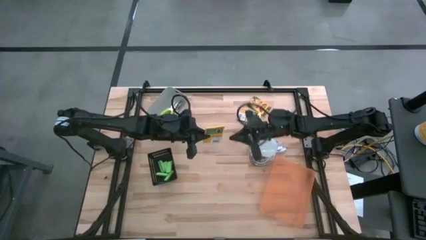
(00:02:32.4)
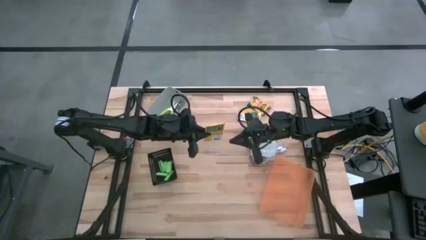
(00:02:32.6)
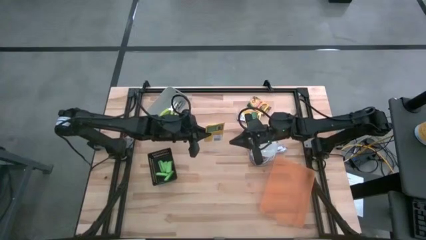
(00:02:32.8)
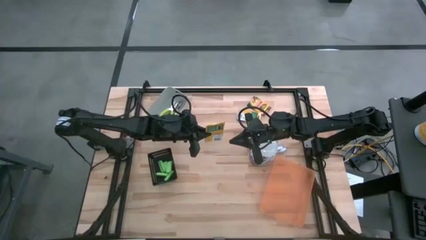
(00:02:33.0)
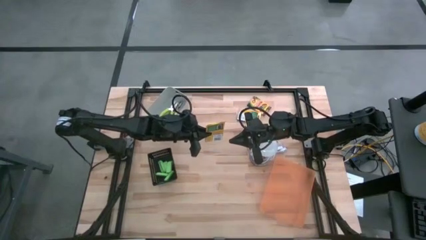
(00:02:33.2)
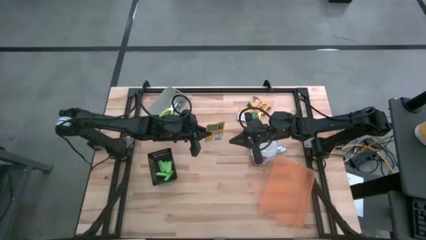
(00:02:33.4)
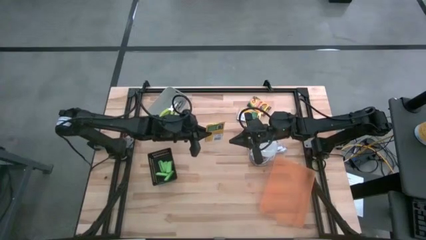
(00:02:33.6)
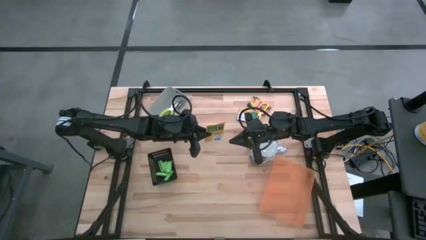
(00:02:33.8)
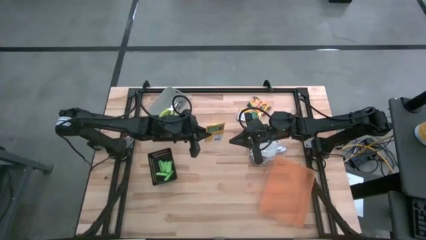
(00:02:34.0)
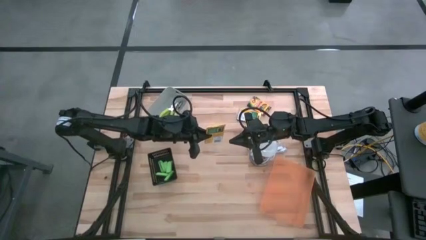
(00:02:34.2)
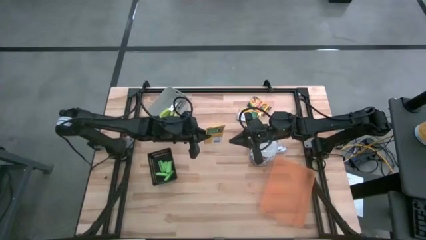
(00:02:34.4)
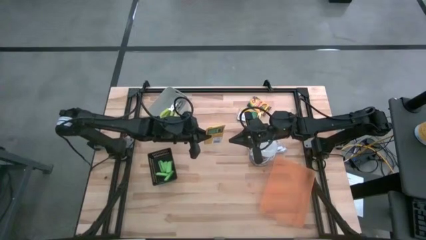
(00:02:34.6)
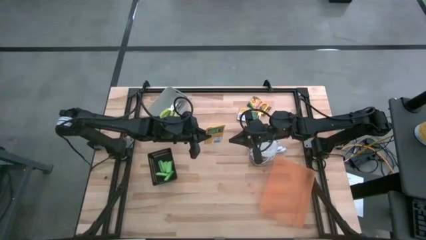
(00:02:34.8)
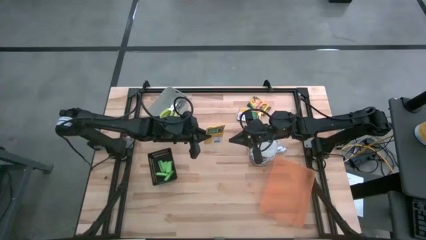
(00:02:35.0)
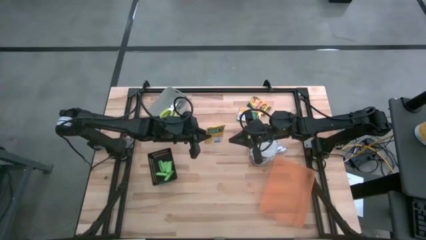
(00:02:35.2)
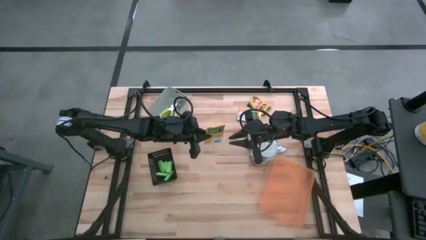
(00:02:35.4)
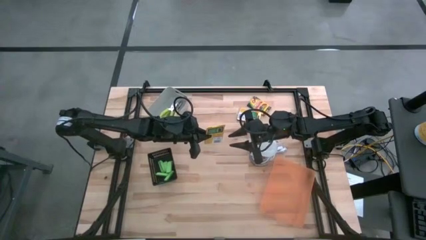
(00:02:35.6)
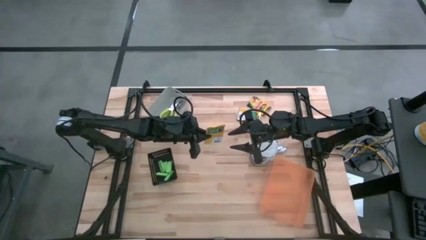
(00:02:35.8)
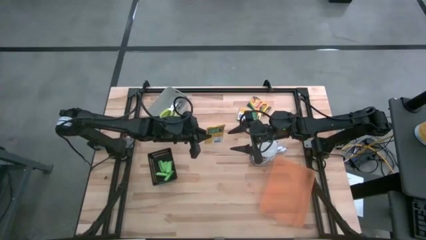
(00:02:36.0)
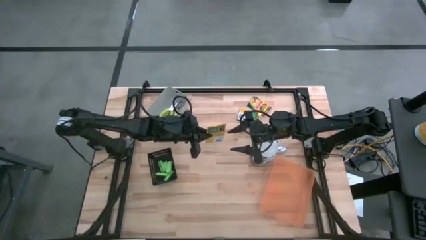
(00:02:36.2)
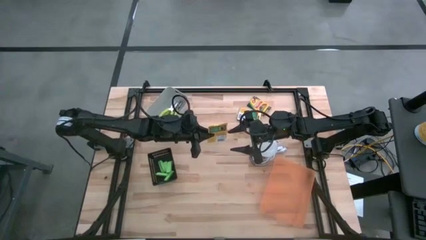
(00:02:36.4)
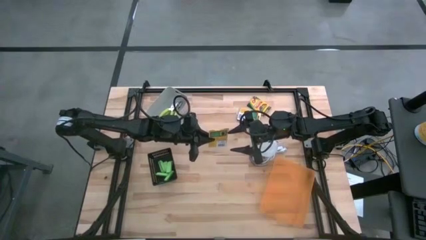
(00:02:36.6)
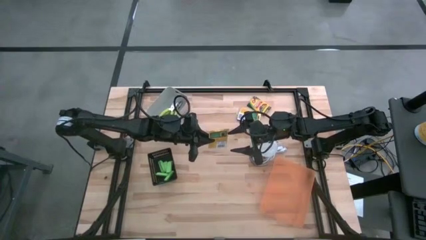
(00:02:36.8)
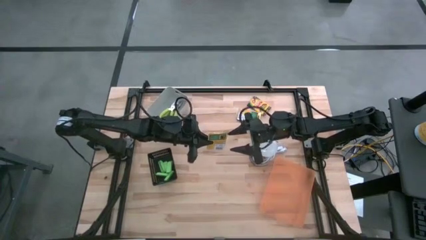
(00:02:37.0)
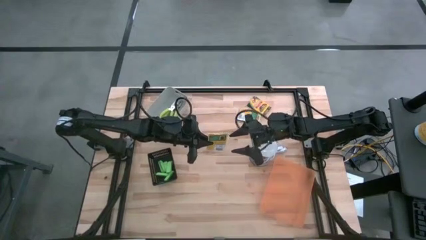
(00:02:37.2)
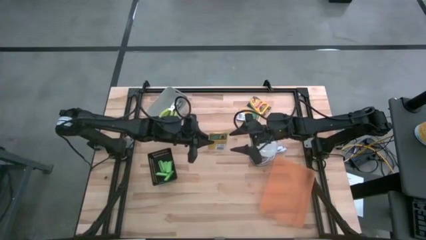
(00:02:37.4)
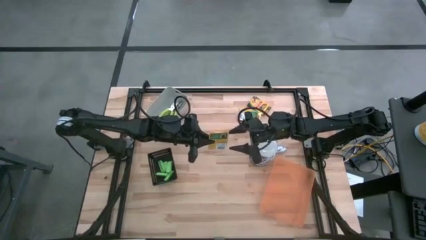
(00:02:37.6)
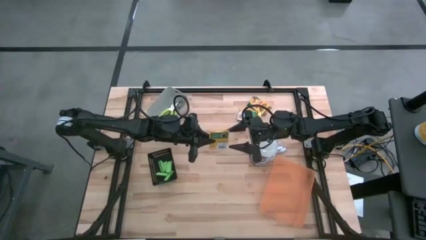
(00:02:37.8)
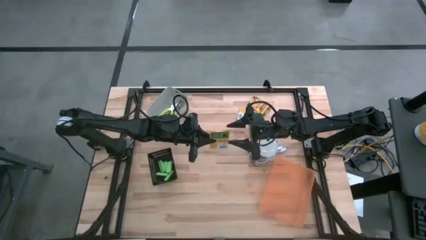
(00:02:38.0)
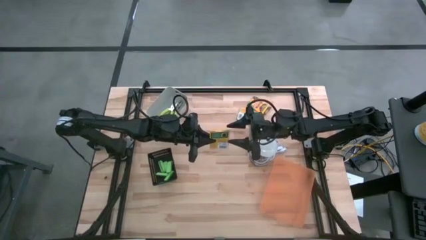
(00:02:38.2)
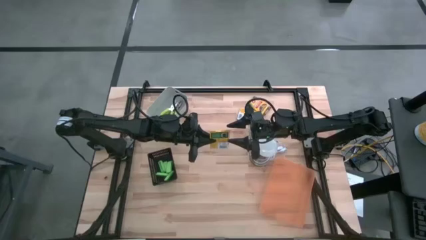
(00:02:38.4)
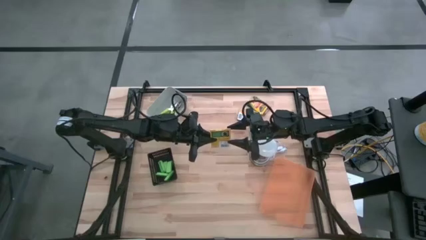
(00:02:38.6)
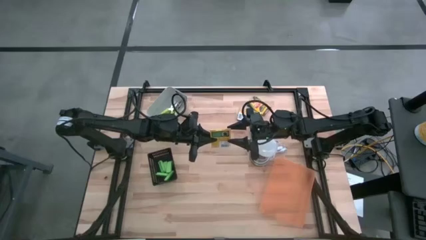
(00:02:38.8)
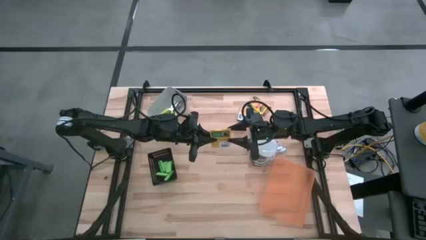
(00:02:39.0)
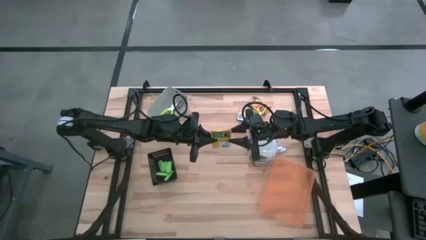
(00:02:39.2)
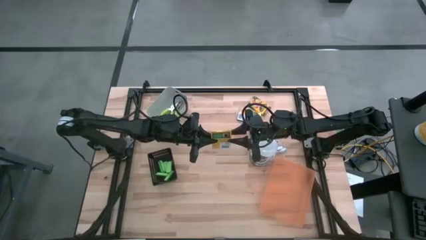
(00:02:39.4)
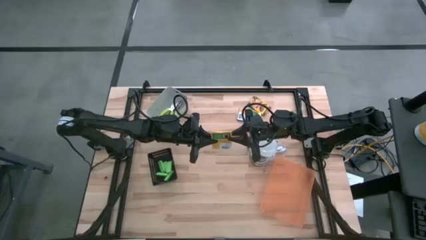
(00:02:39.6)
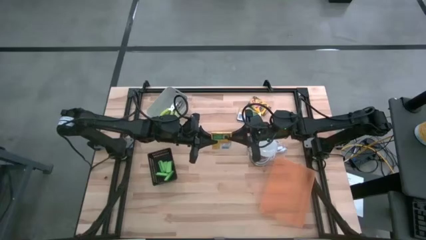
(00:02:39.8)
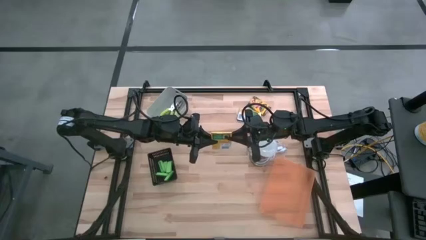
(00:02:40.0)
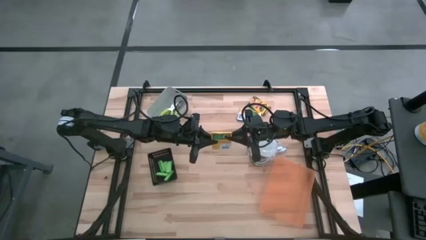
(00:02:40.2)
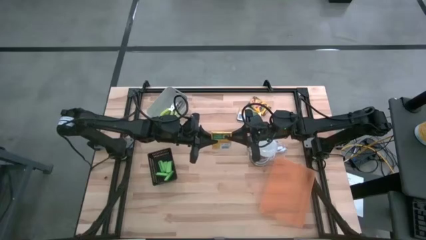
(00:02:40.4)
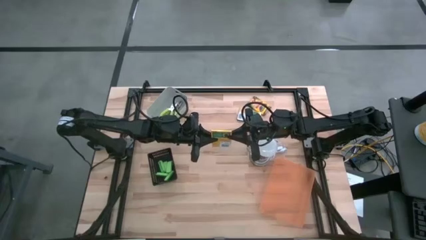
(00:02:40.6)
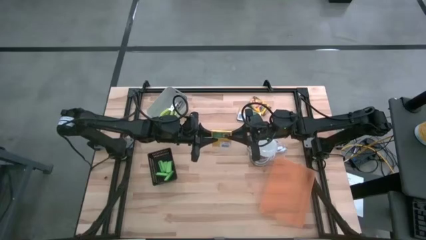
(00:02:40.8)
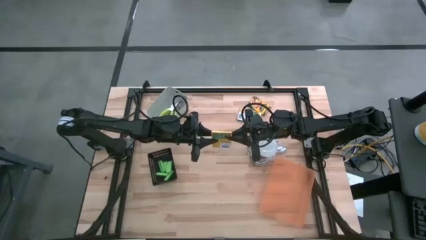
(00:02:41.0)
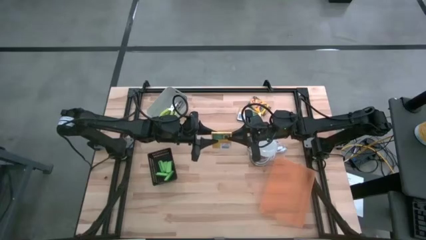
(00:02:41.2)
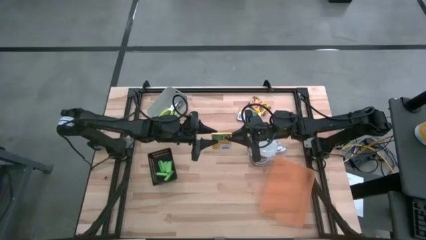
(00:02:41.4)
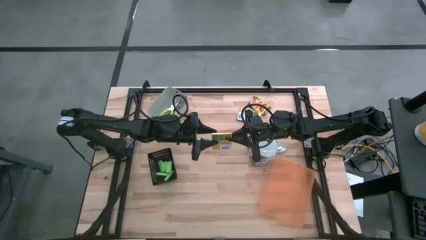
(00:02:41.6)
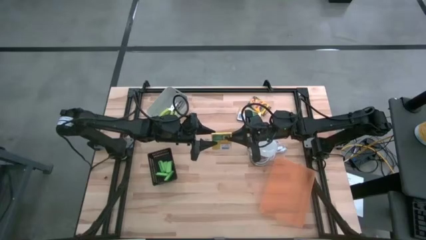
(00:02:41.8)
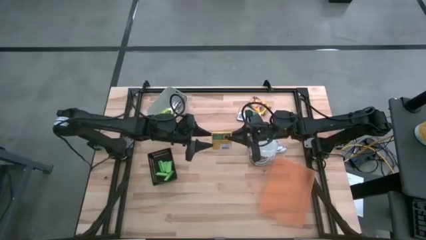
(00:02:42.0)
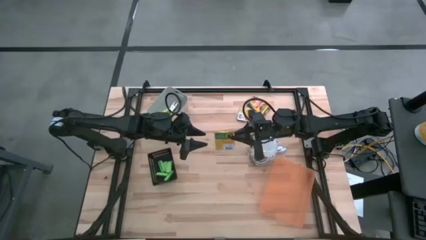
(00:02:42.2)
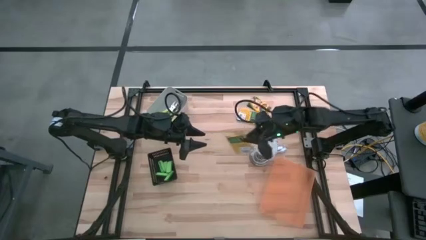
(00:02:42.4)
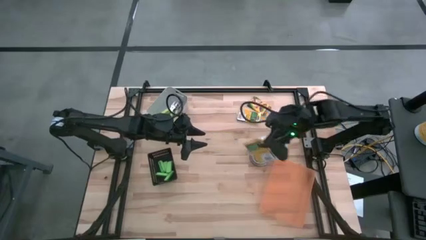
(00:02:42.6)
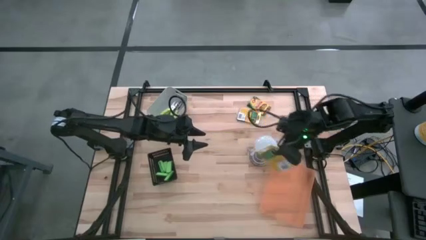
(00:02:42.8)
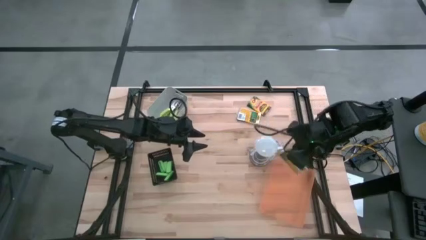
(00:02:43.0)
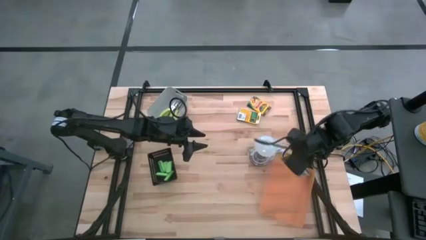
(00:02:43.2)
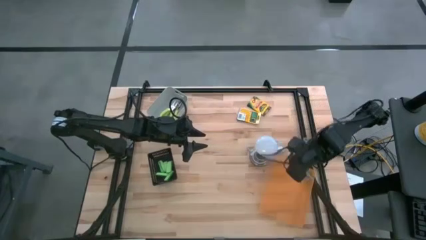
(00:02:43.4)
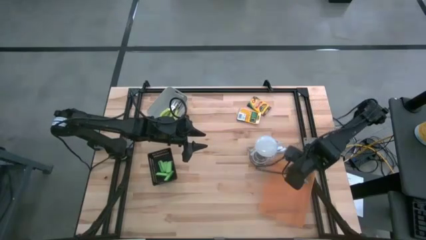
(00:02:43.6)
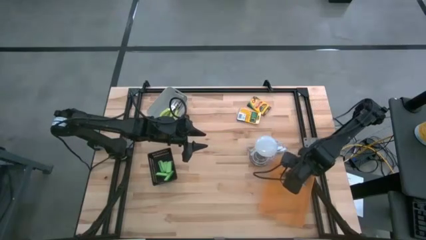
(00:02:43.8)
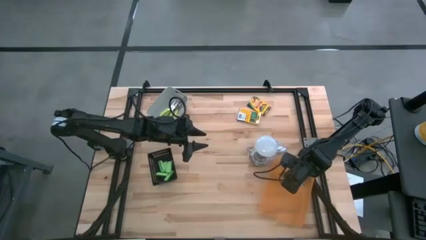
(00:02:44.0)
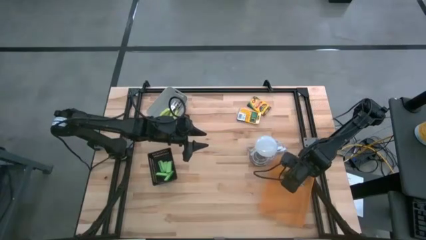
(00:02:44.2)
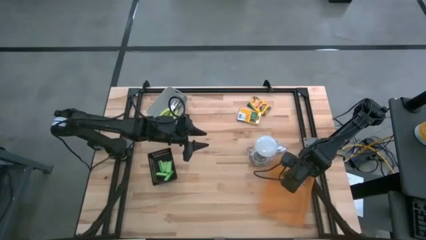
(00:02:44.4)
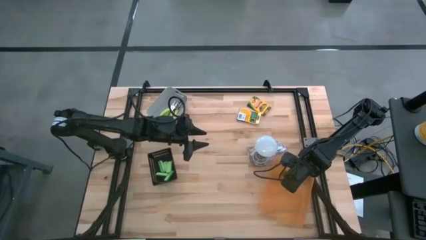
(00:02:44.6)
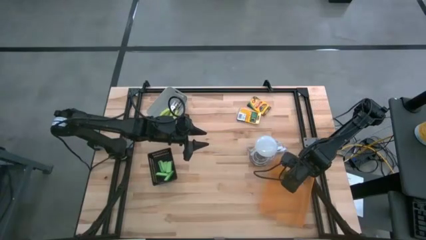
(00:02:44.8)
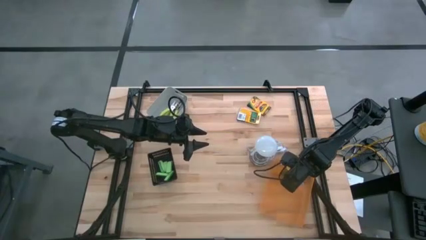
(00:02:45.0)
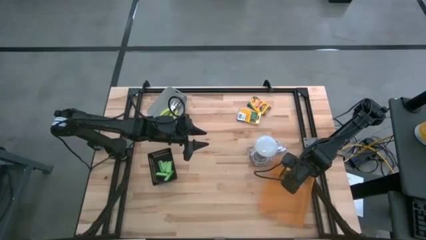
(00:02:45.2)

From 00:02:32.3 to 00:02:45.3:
Task: Pick & Place School Supplies
Put the yellow yellow crayon box into the orange bin

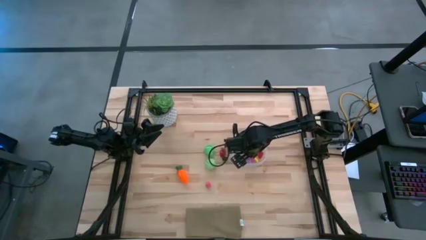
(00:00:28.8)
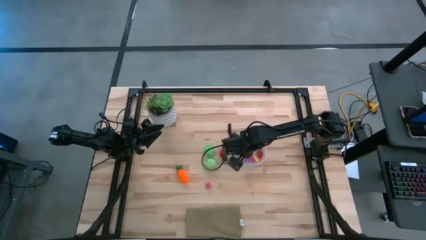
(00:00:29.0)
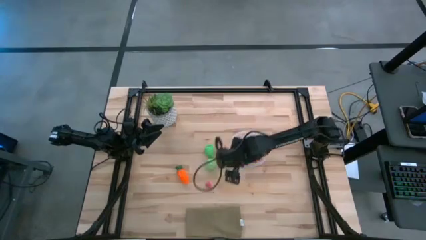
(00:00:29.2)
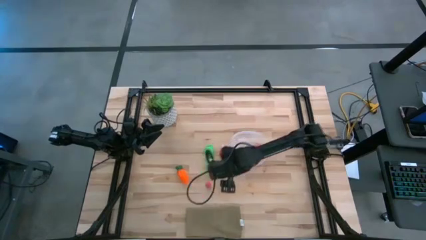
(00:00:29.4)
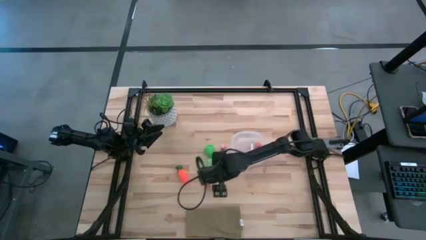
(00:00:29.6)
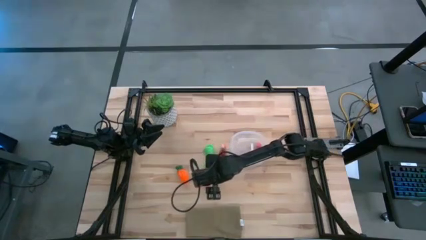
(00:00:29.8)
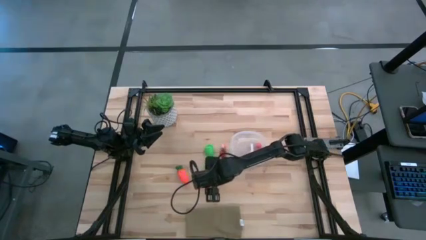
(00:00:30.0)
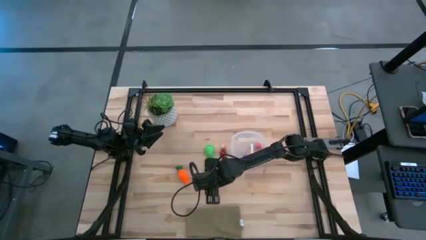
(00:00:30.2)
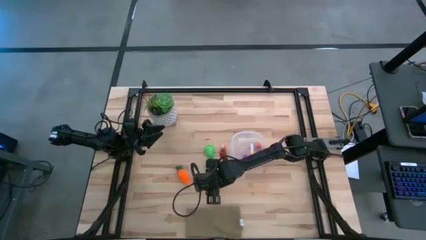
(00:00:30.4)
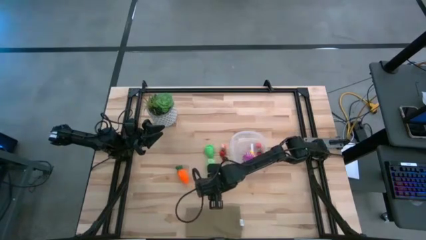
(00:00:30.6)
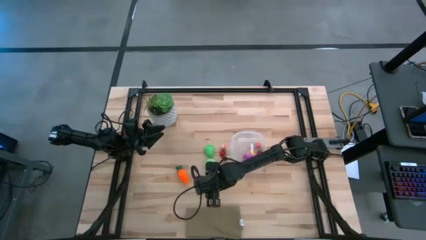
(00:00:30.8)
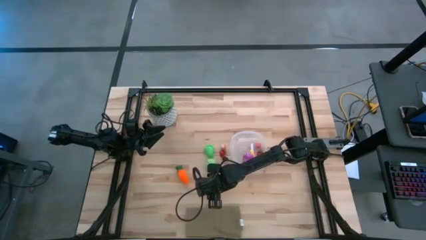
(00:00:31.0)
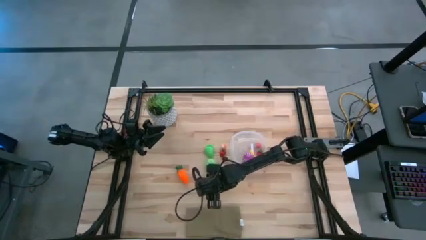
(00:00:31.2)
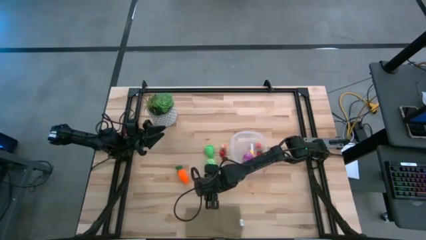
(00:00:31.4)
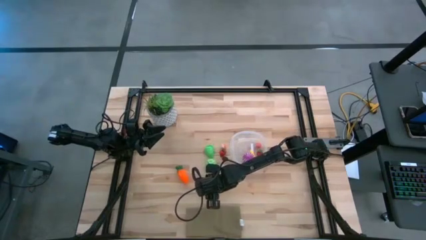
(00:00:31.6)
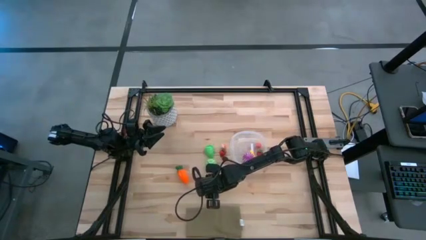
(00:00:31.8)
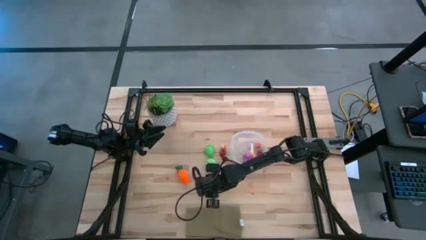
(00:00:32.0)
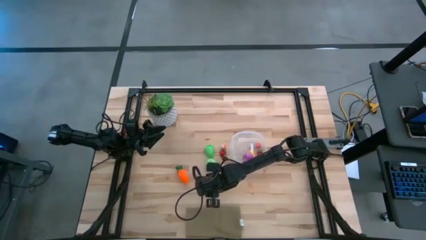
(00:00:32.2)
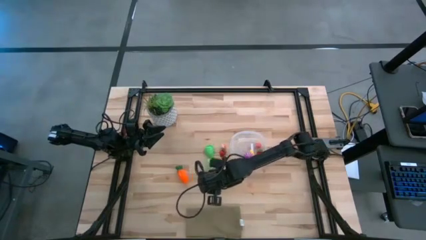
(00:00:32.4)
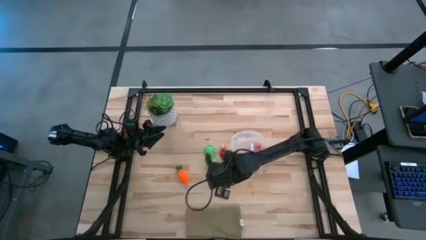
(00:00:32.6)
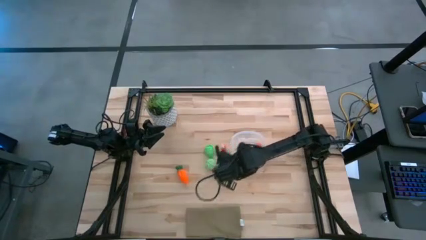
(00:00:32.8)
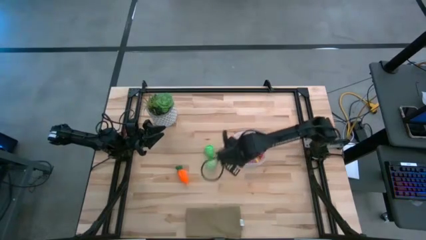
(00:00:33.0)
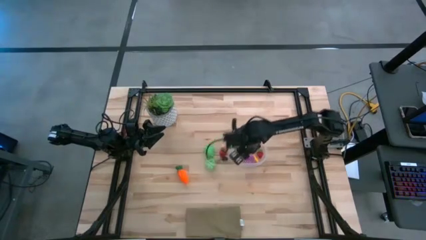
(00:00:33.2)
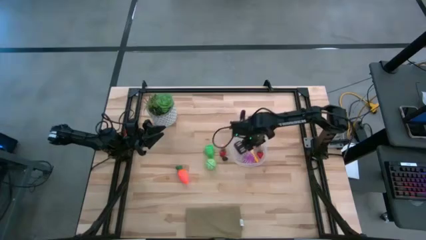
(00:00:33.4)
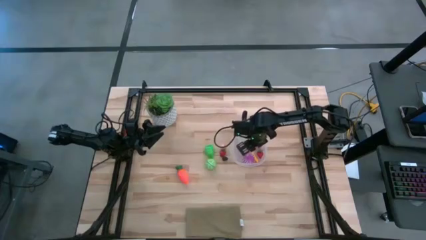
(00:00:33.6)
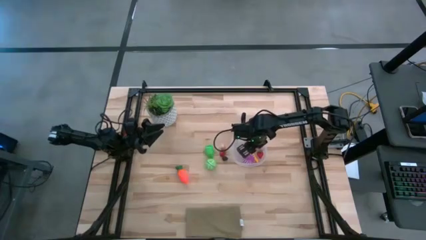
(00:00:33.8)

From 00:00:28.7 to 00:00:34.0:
Task: Pick and placing Produce into tupperware
Put the bottom pink peach into the transparent container
